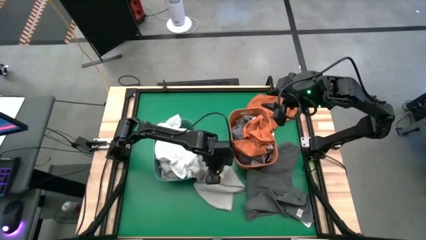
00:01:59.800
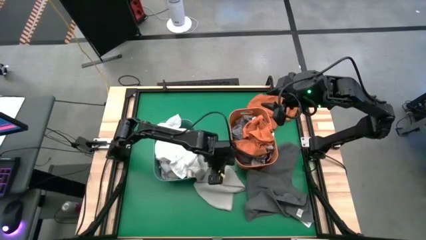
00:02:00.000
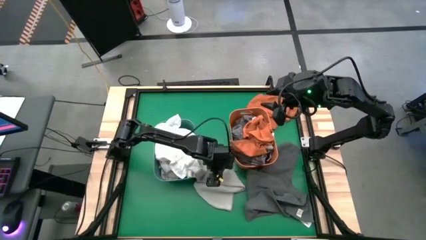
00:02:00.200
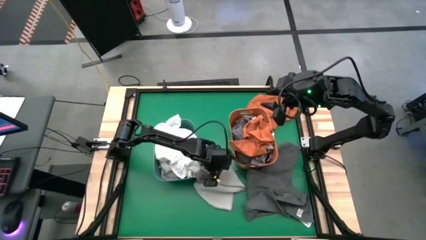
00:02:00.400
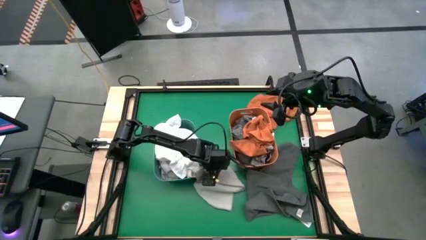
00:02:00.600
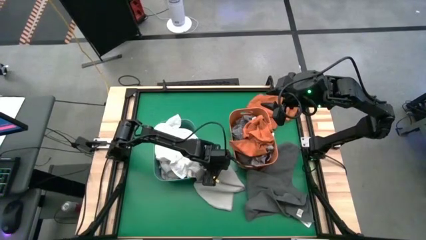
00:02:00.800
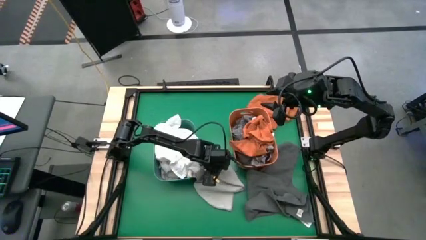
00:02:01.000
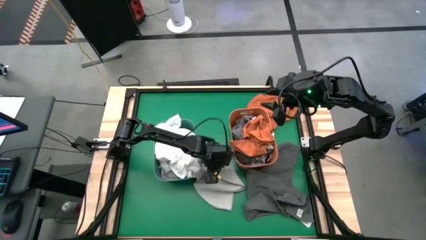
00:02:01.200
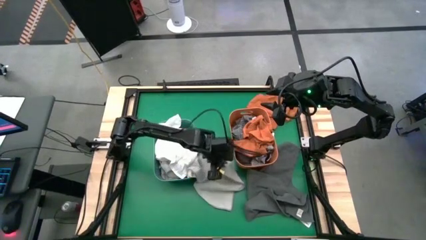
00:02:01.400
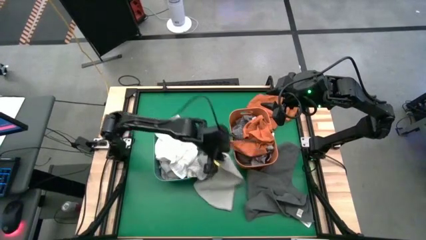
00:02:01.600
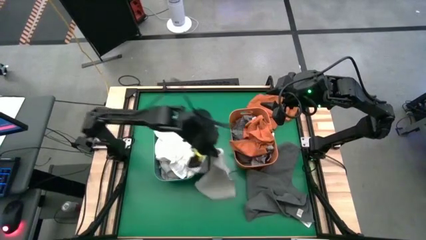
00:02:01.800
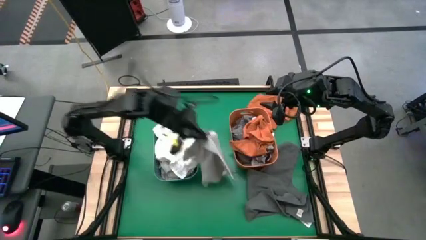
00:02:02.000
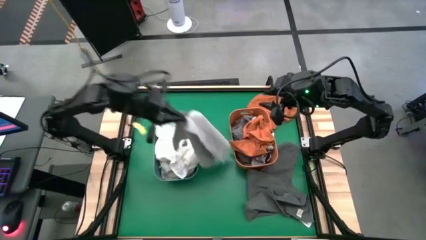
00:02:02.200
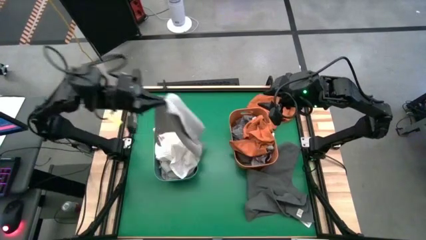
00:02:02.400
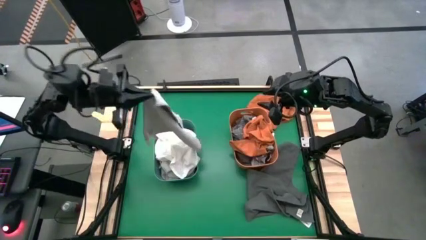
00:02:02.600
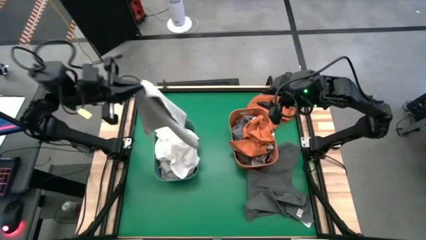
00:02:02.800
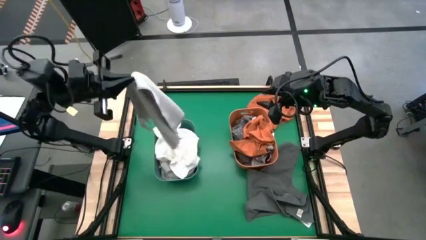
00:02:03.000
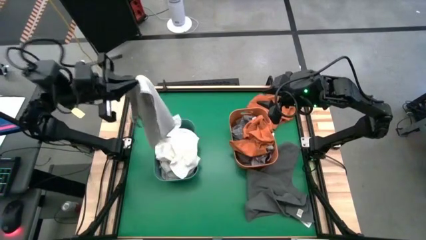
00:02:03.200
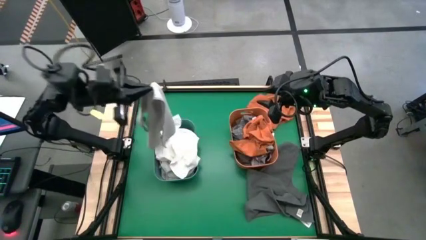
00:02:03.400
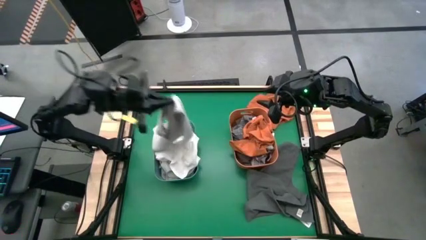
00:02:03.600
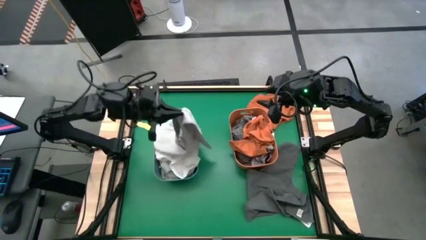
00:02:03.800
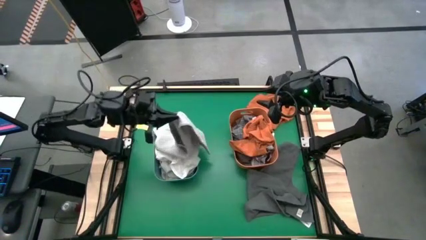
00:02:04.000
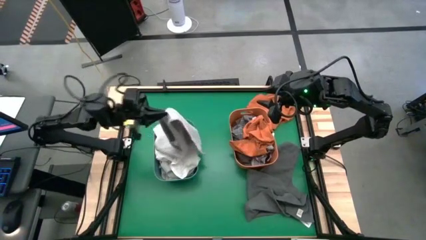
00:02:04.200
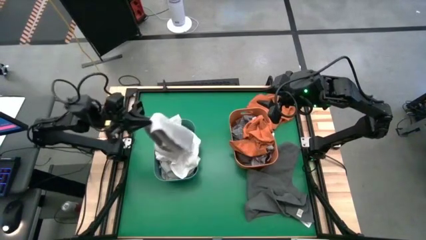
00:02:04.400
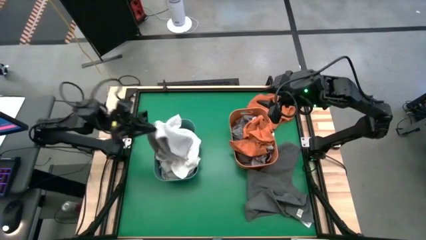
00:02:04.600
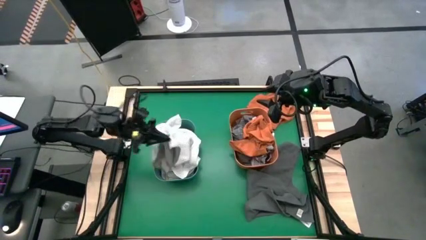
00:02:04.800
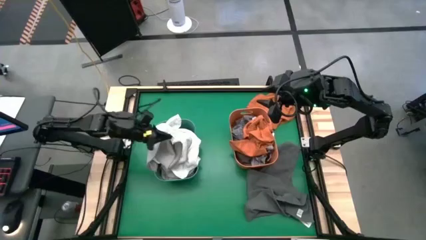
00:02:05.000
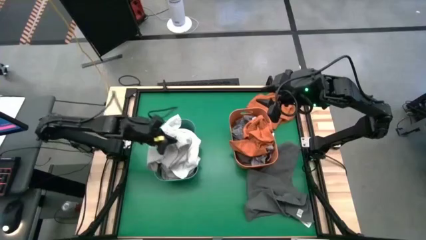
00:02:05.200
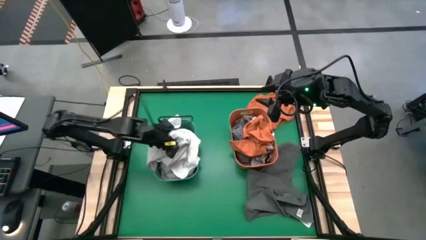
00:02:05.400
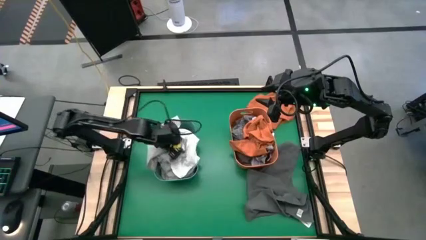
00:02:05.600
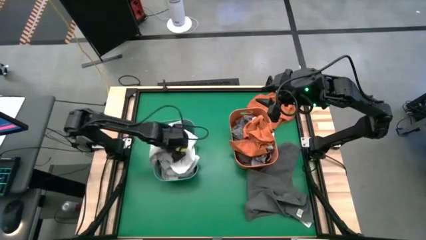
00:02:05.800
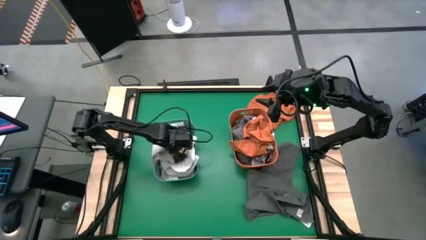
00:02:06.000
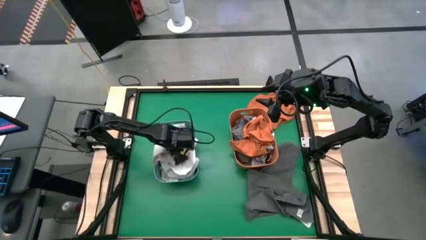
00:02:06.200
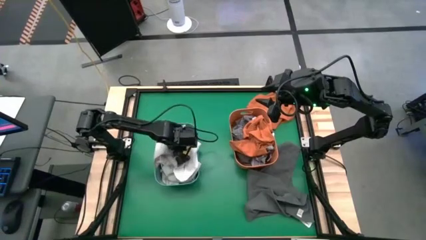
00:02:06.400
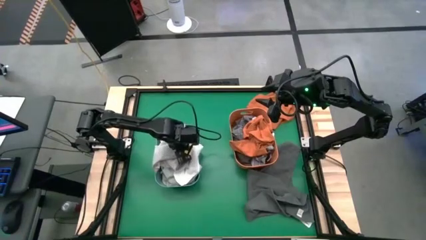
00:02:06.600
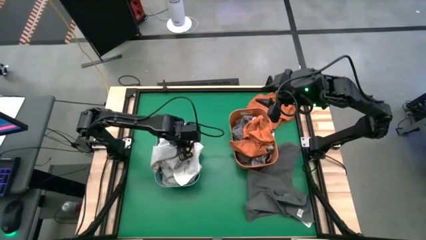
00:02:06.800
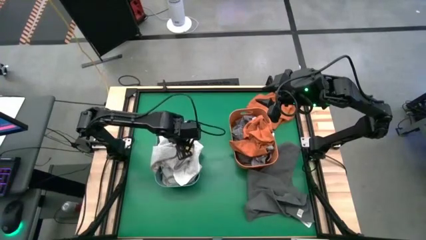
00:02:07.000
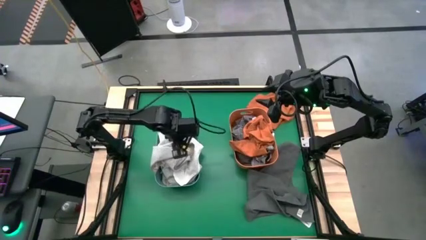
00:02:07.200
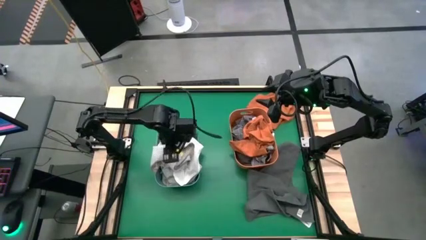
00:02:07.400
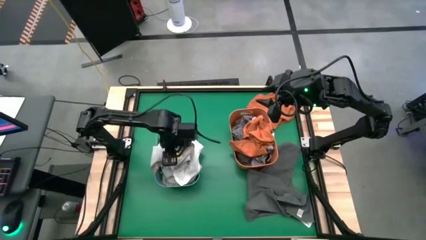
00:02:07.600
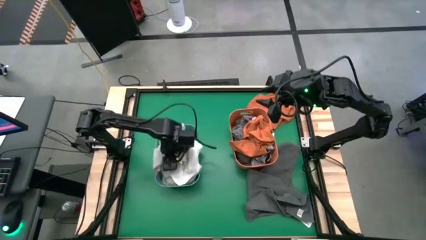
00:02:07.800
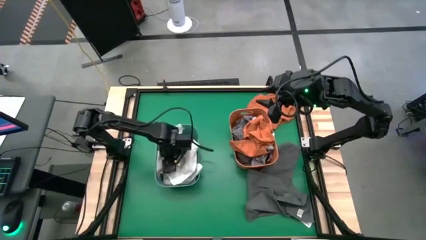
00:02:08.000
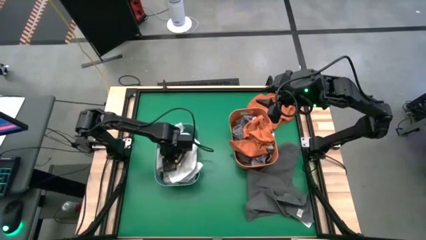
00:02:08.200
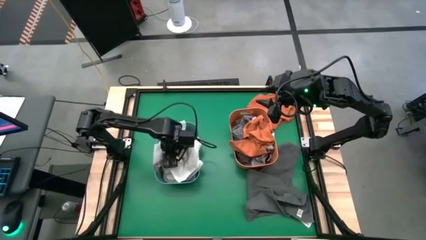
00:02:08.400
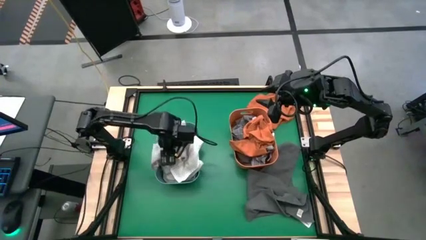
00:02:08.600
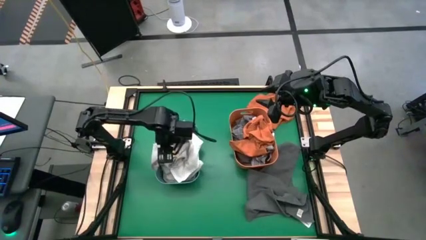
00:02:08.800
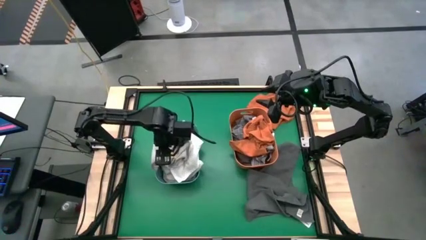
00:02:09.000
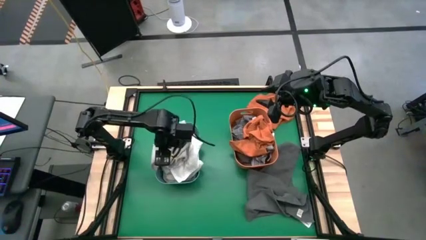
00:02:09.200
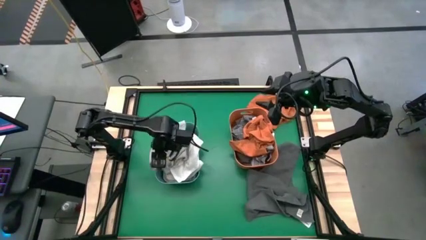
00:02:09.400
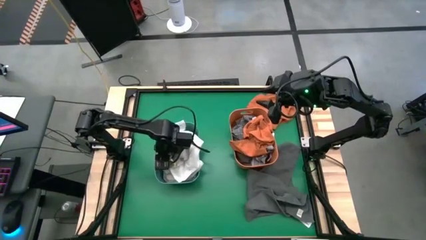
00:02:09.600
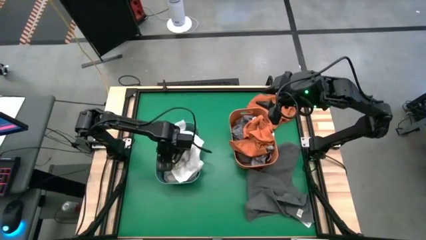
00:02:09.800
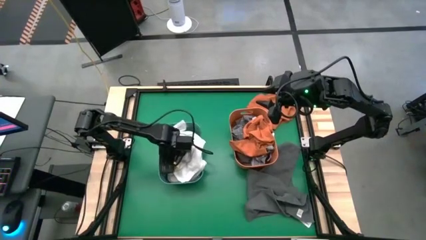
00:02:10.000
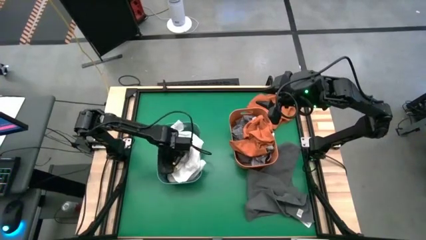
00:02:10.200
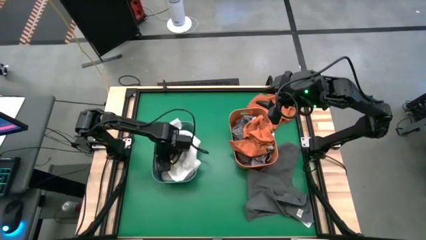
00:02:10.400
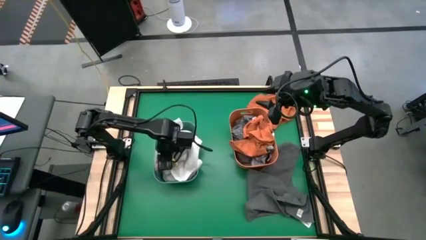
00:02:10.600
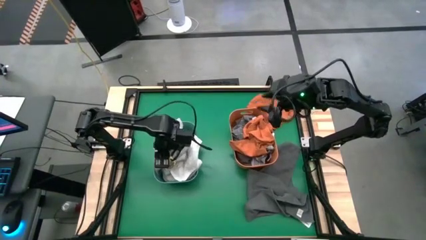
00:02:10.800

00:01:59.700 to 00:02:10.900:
Task: Sort towels by color in basket
Put the gray towel into the green bin

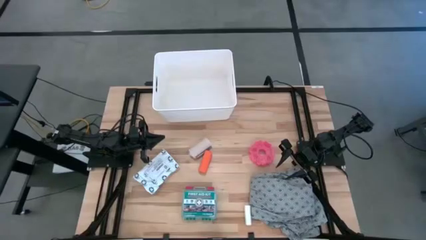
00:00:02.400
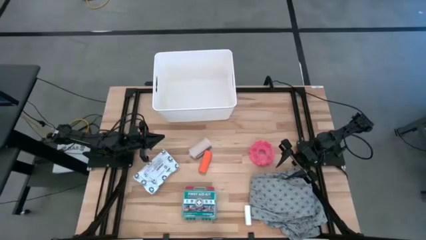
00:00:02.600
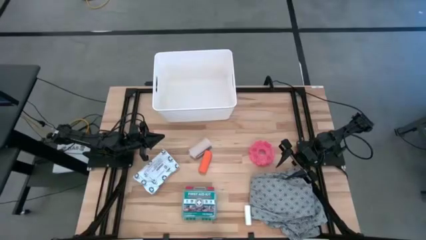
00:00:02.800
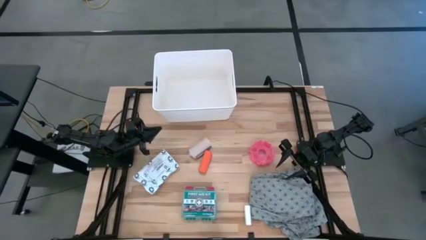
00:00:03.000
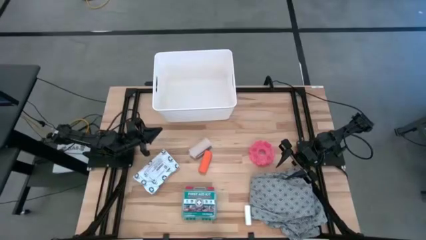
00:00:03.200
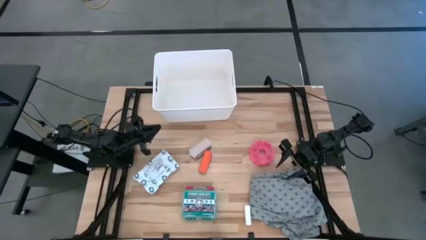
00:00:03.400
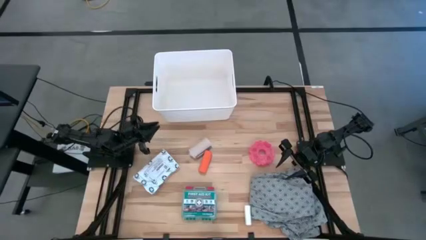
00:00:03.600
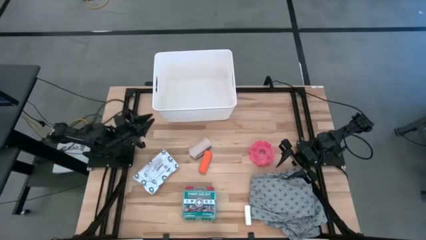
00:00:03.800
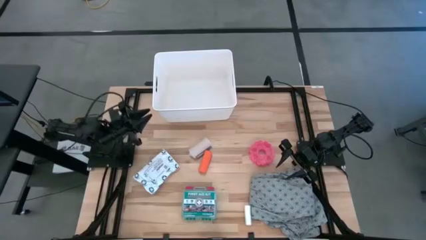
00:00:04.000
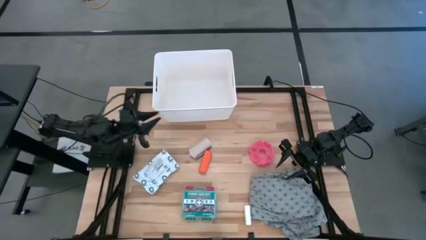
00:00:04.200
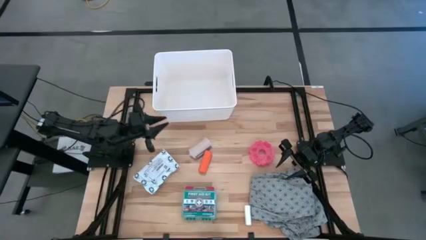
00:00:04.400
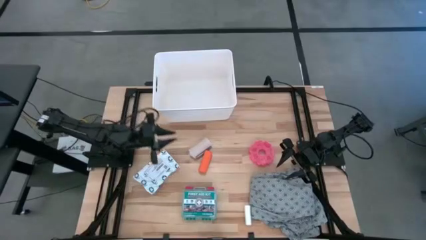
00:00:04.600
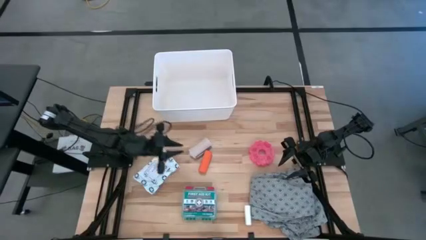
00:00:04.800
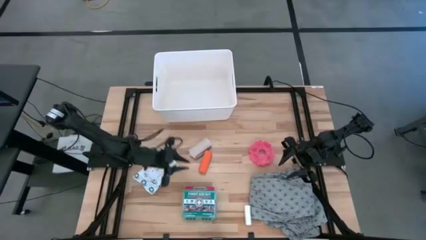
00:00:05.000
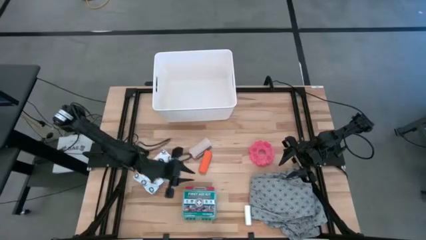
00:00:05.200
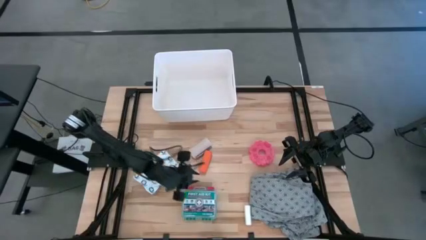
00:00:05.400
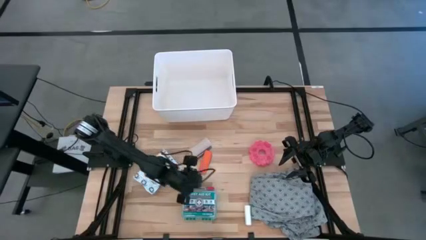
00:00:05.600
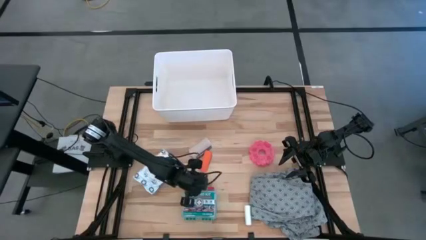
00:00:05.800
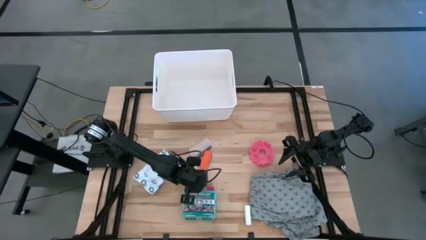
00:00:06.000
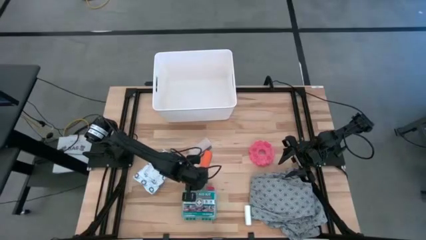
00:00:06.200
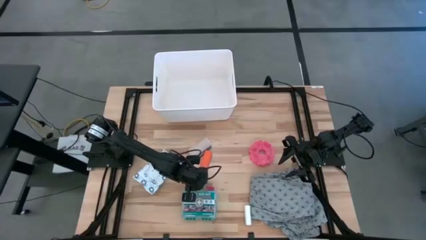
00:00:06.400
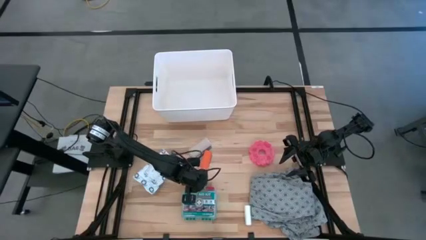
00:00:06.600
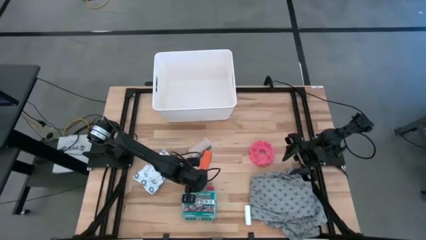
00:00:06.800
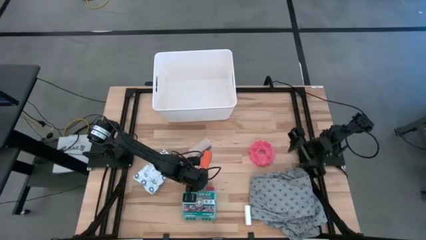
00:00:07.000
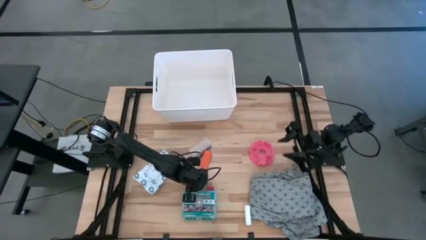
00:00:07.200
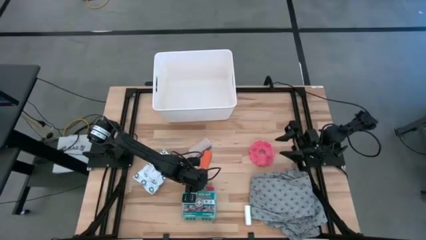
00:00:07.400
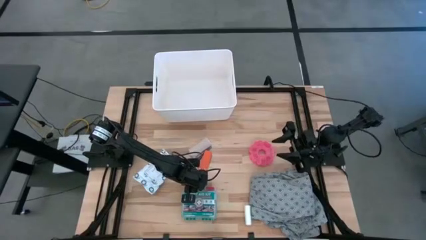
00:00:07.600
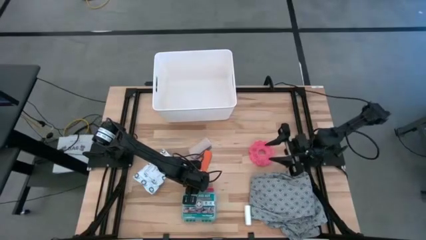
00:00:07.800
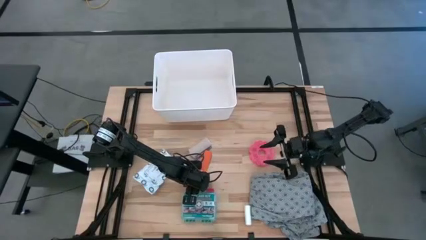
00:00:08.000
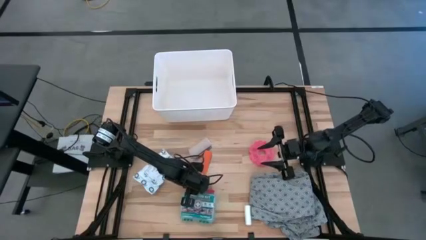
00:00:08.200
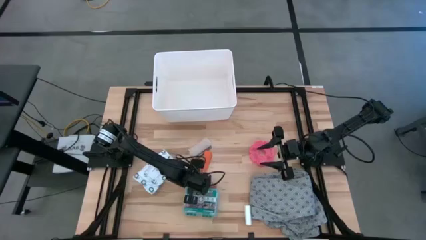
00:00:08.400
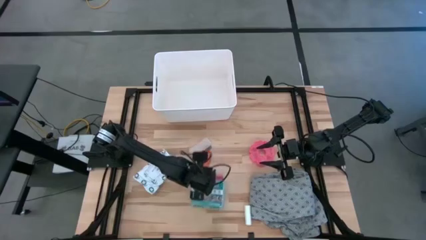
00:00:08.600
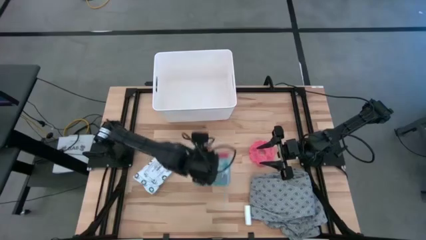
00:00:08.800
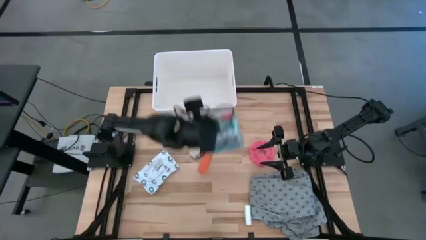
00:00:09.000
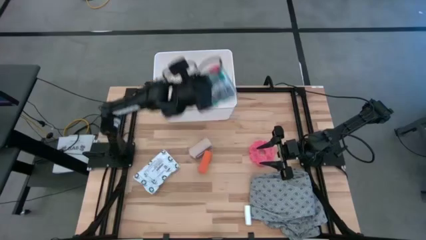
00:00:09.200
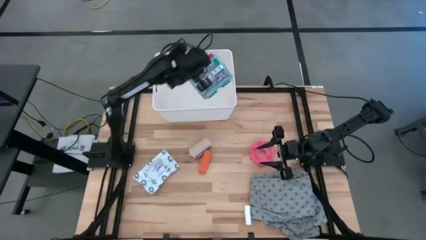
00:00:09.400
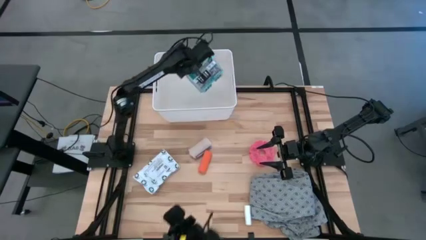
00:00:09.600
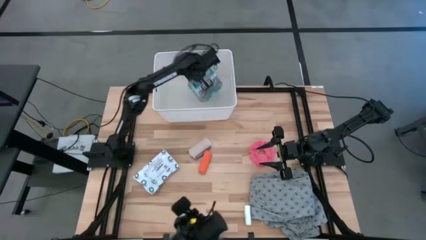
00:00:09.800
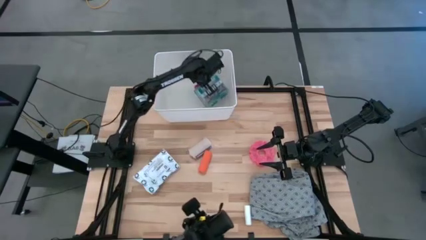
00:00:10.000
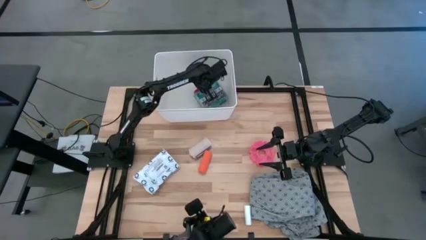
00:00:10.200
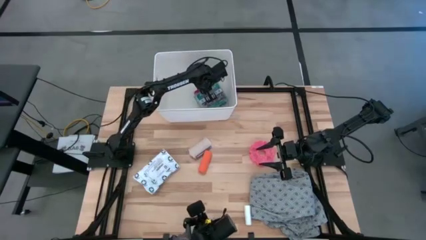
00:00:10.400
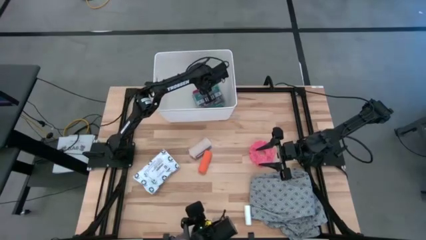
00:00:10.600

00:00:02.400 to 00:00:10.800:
Task: Pick & place medical supplies in basket/bin
Put the green first aid kit into the white bin
